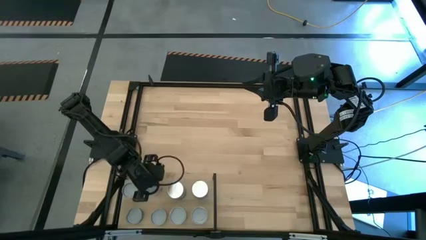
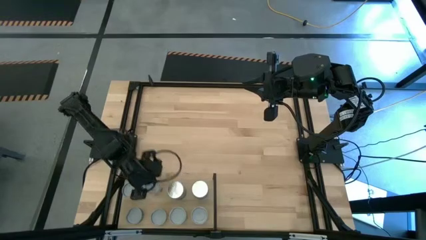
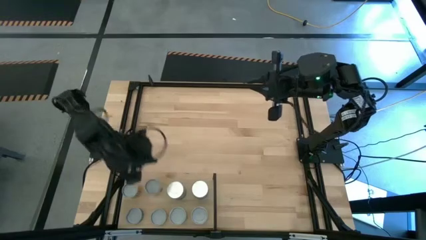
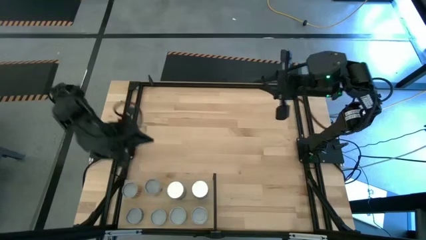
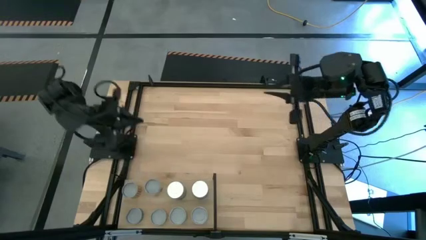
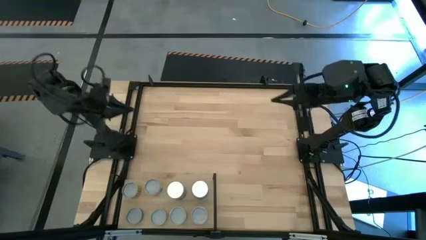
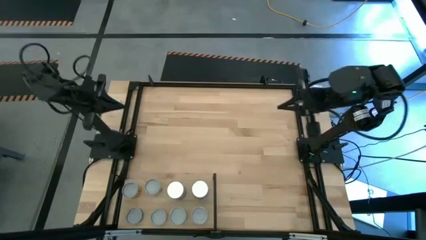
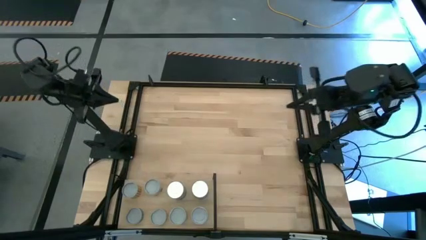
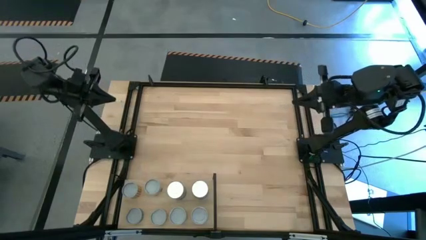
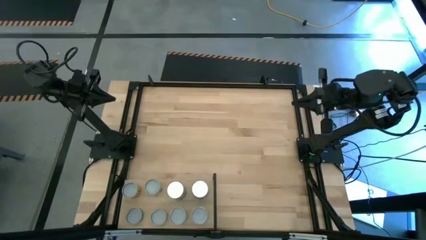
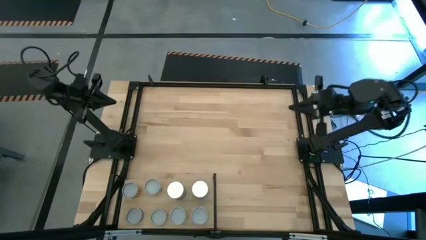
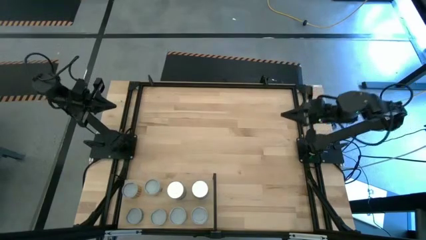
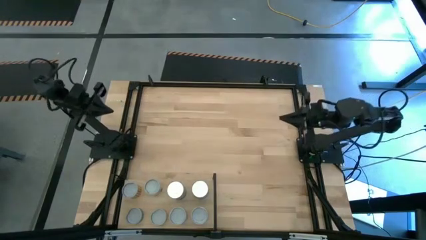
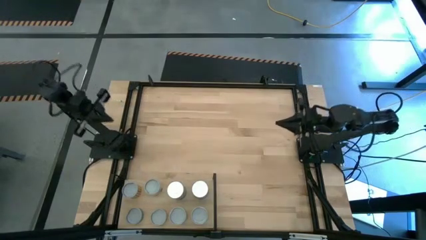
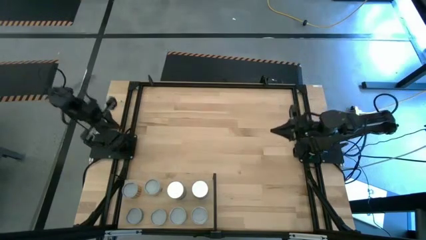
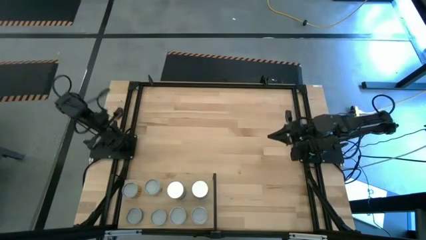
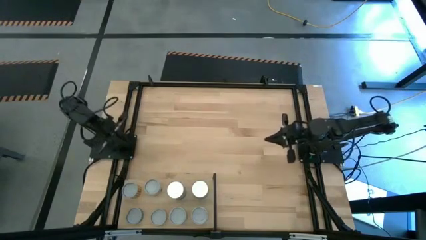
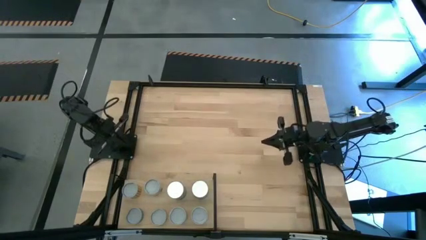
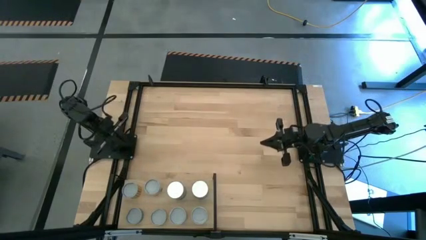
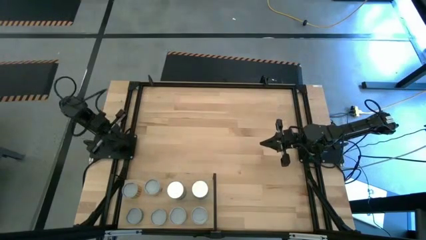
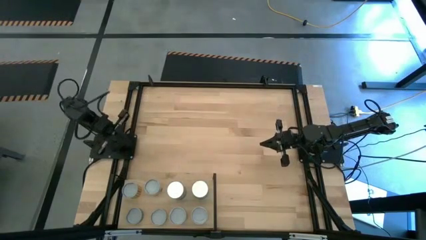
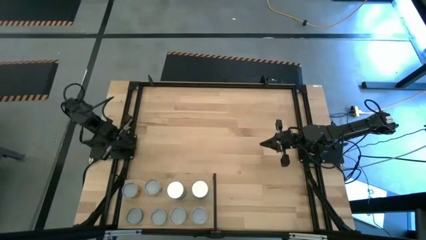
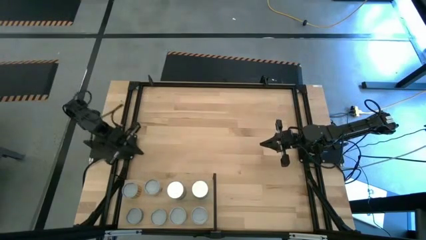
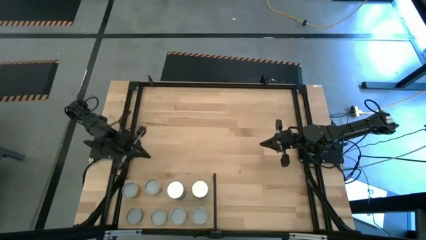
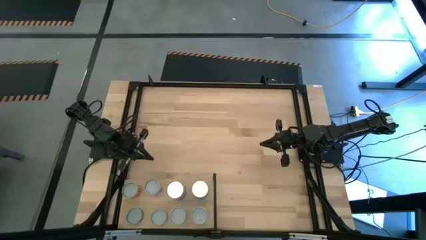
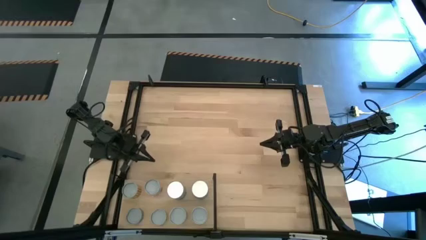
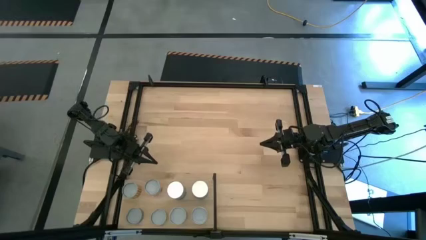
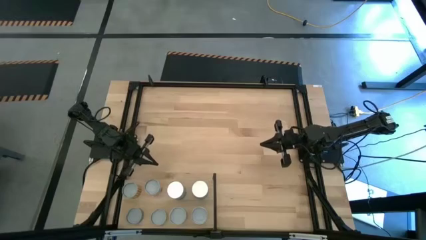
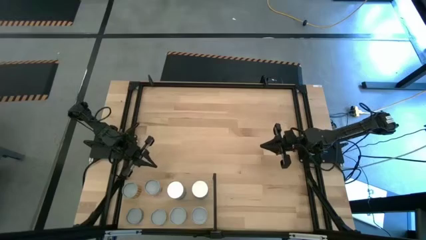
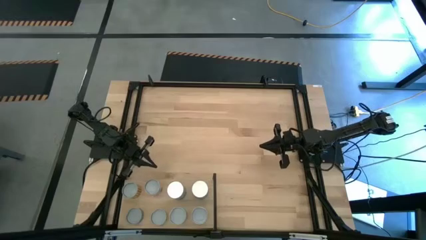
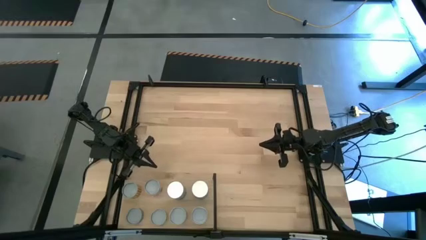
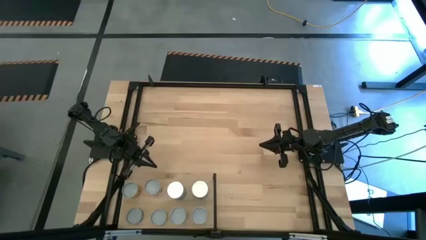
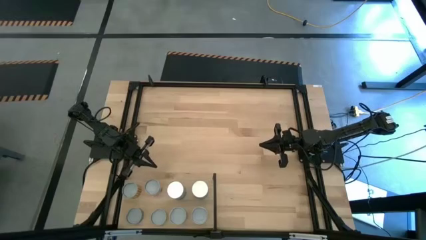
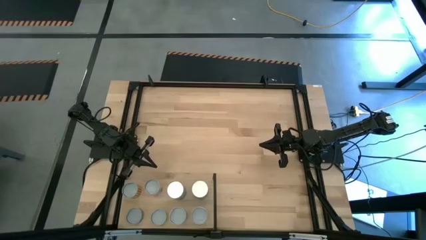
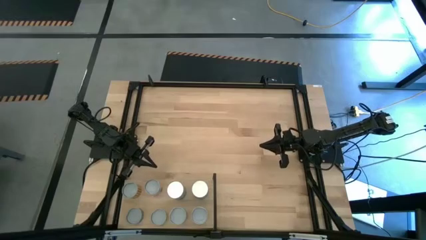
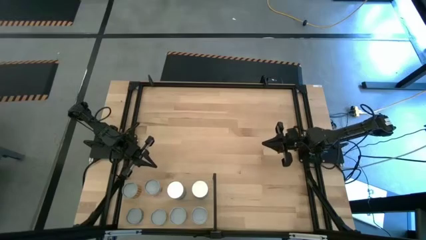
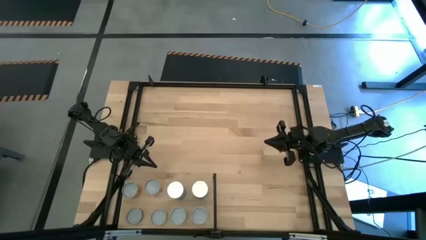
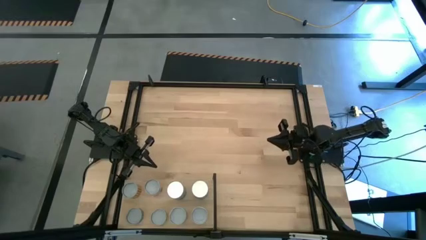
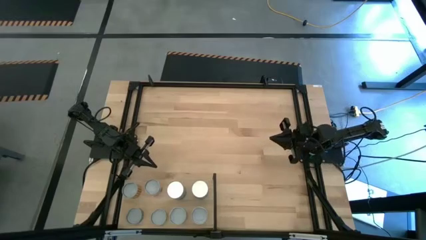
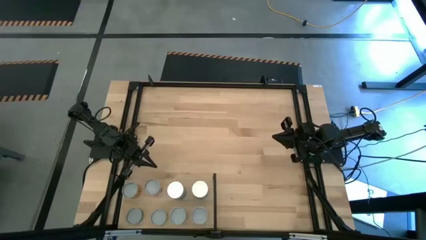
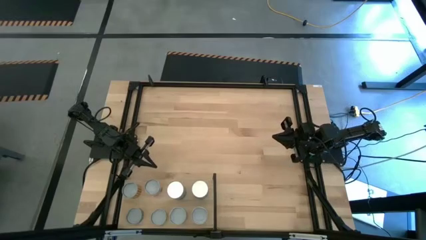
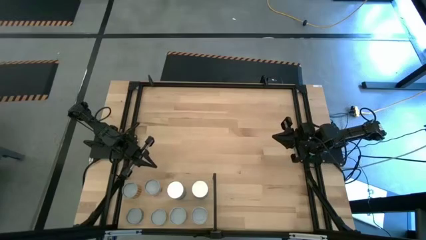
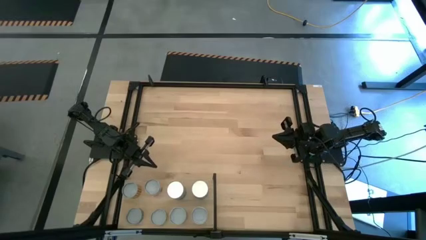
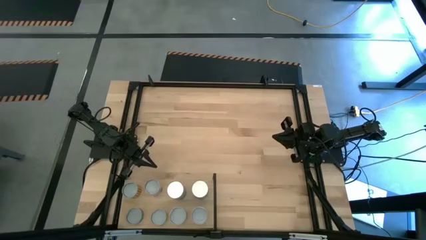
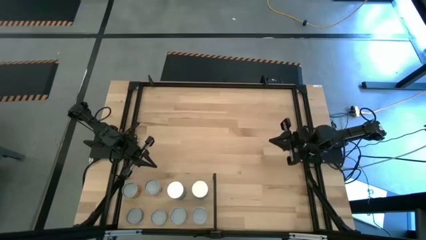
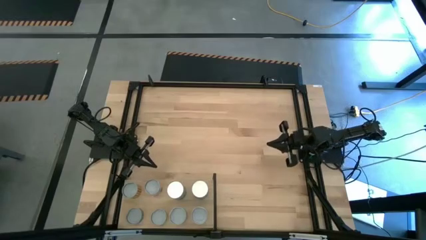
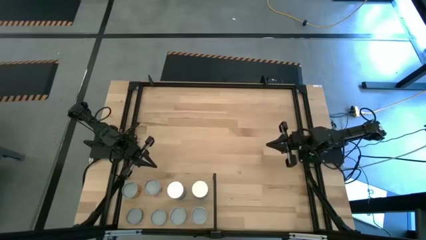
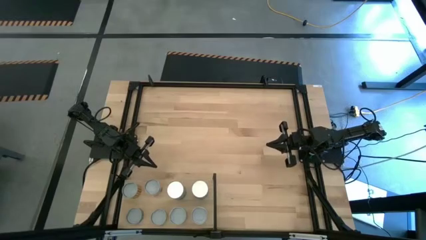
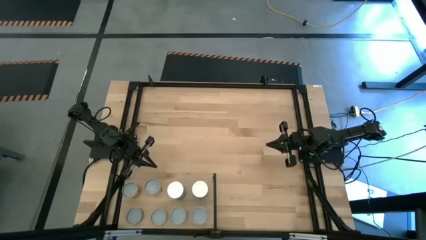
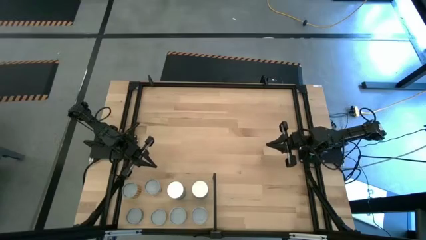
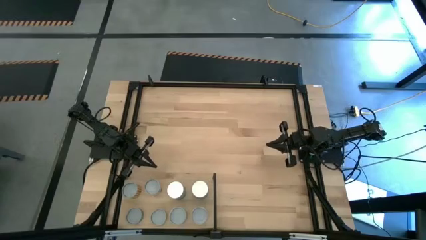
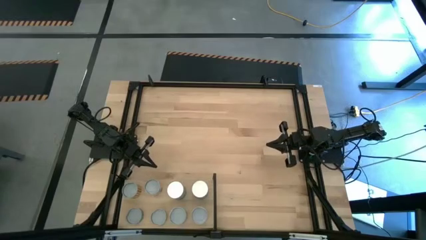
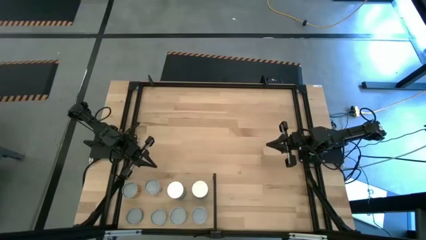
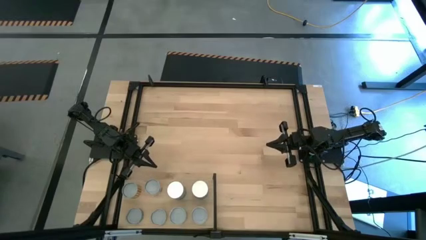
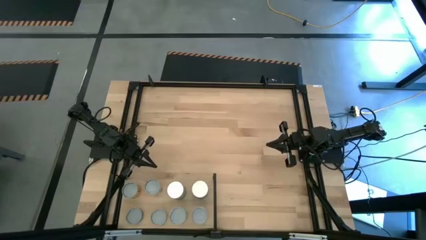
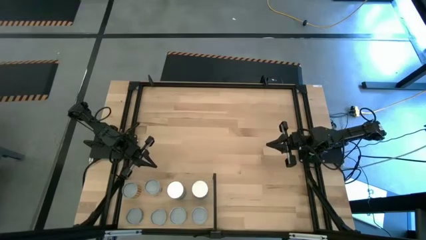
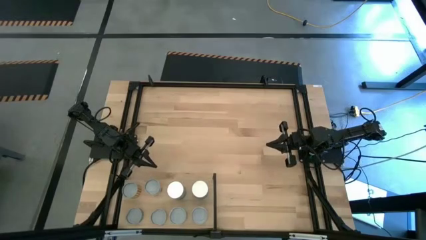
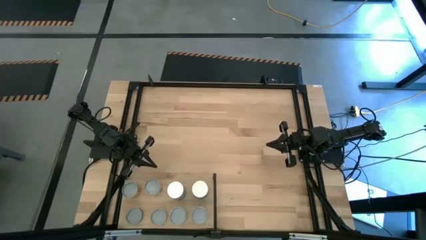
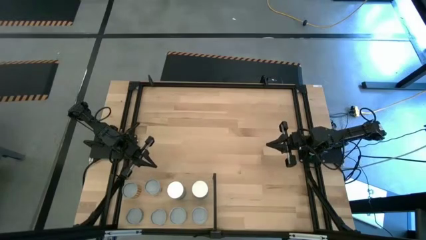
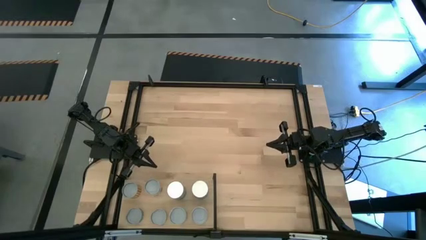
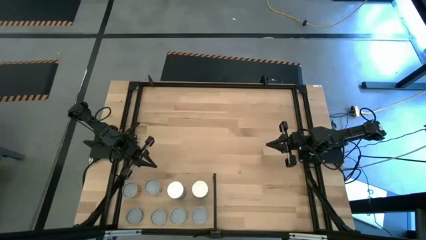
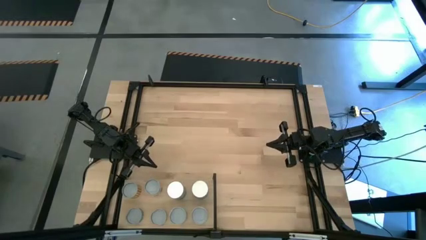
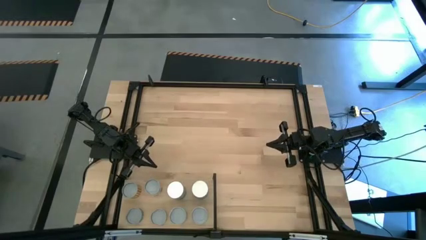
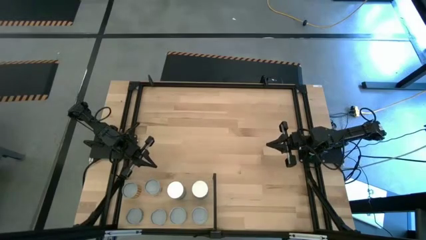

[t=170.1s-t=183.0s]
Task: Pick and place cans onto a shelf
Return to Home Position

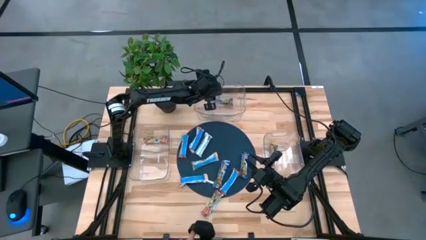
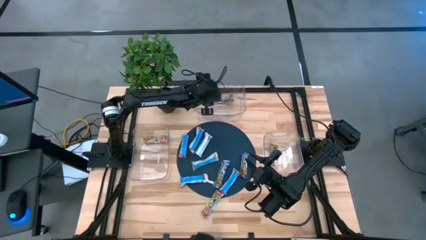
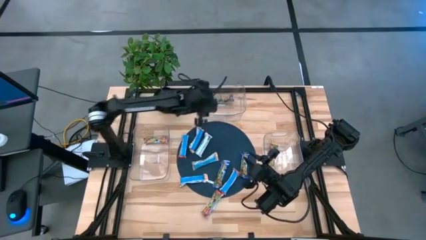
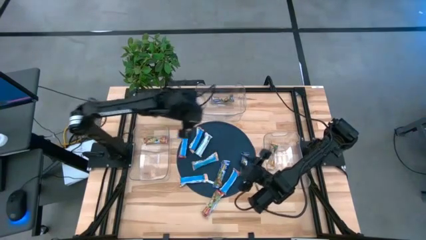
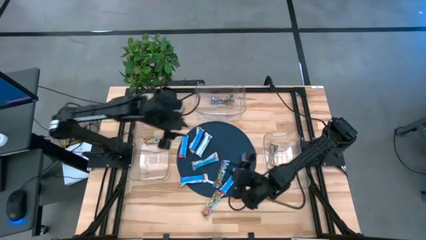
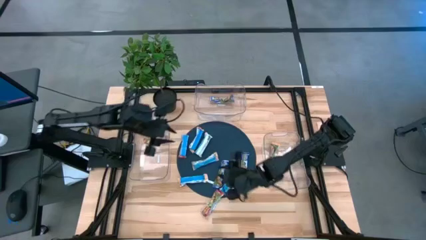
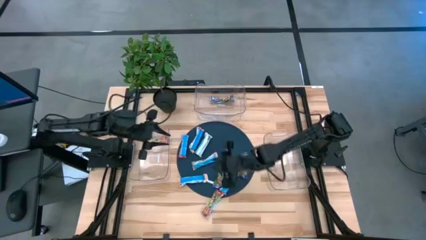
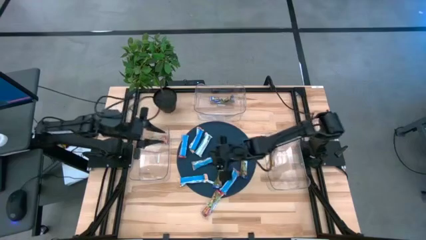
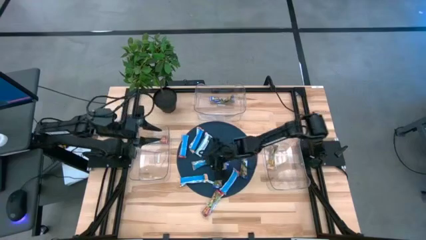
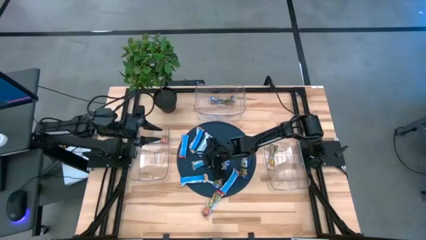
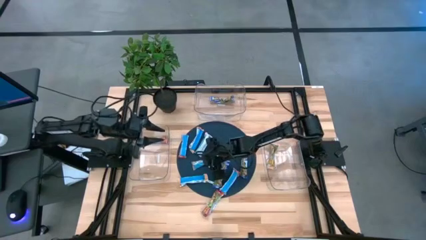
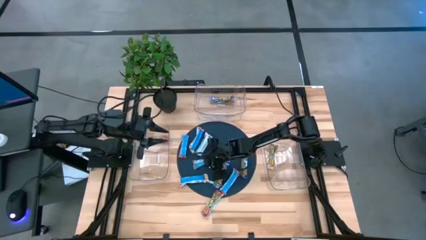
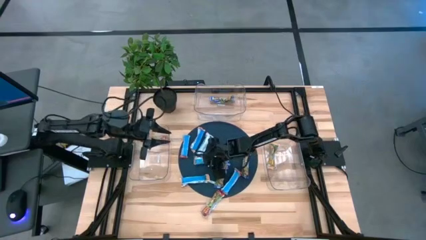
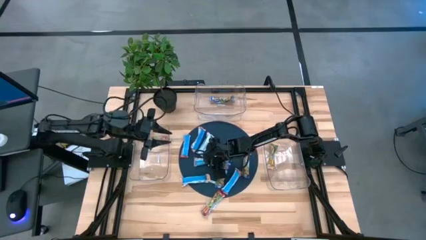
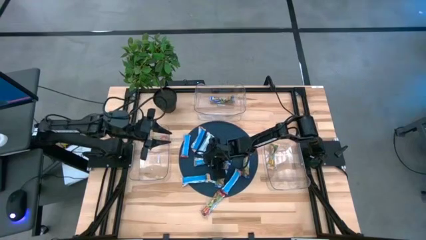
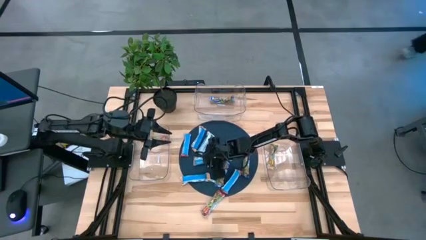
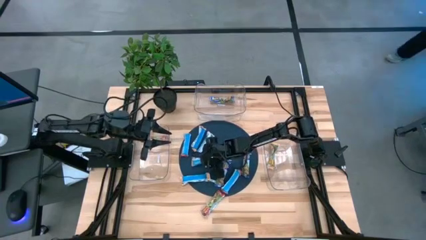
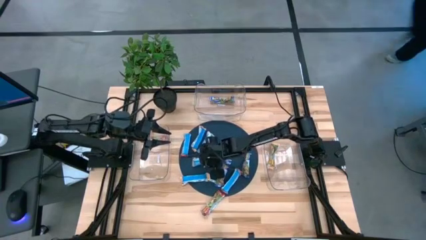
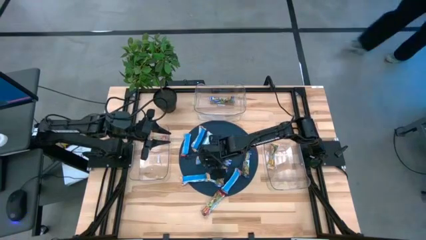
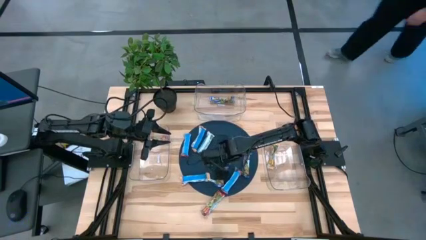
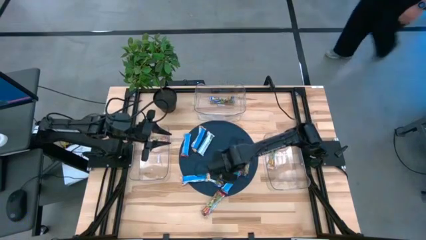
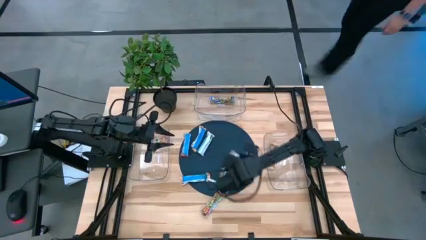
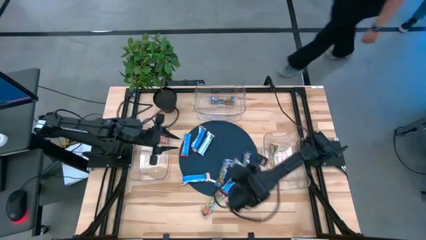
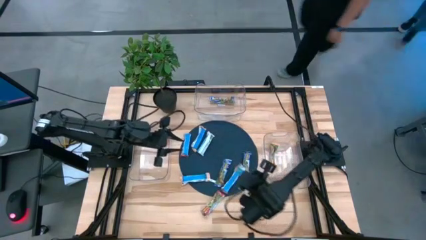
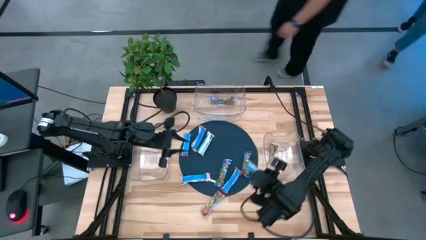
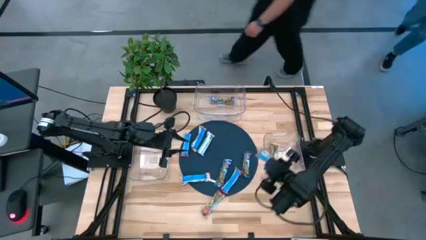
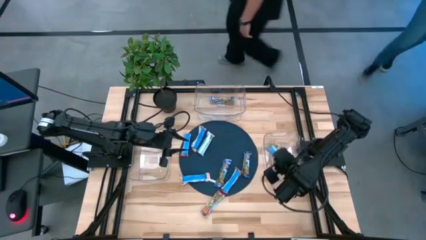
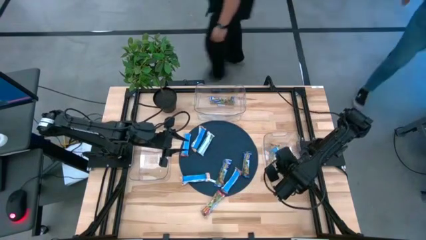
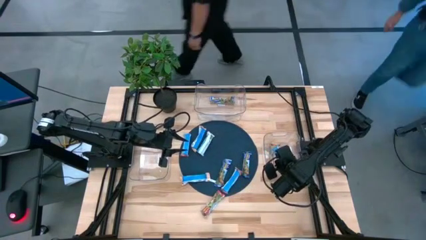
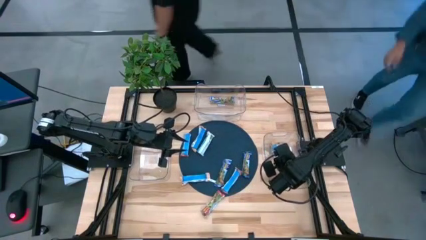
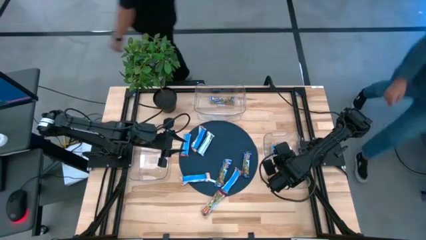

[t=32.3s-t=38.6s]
Task: Pick and place Granola Bars by type
Put the orange granola bar into the right transparent bin
